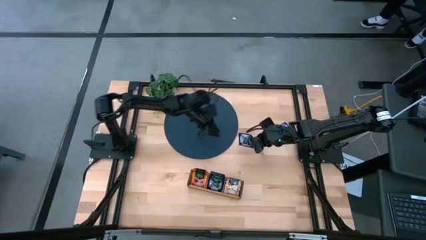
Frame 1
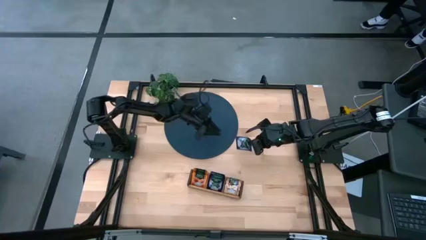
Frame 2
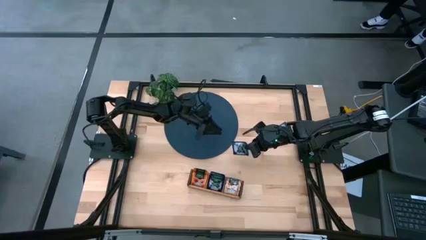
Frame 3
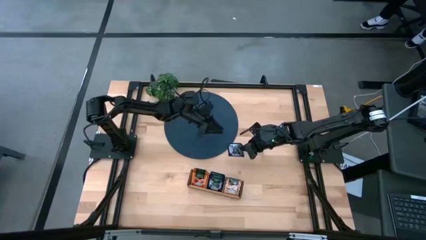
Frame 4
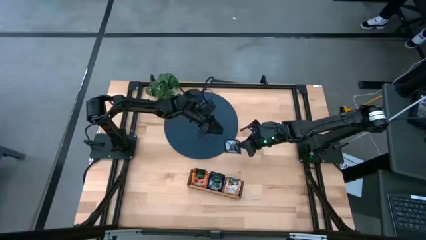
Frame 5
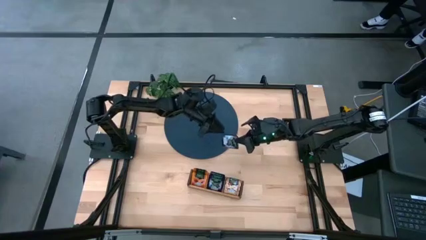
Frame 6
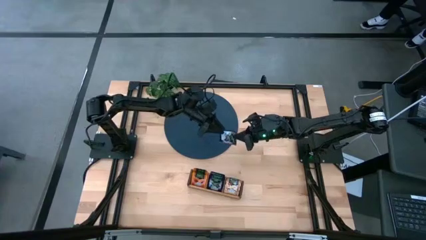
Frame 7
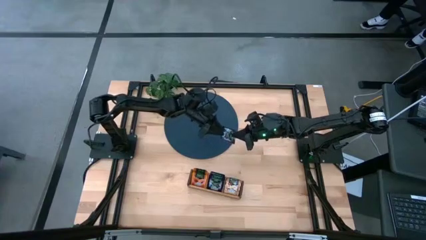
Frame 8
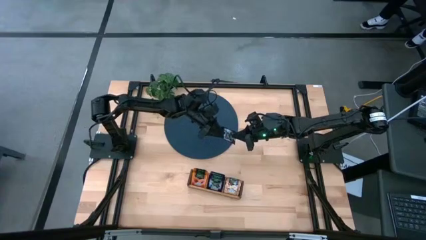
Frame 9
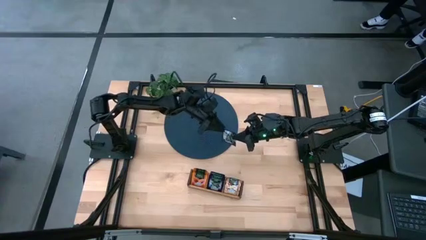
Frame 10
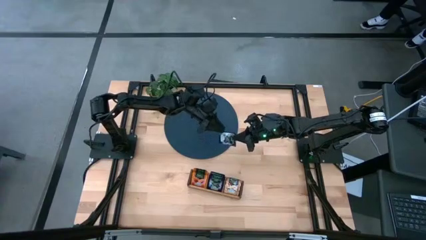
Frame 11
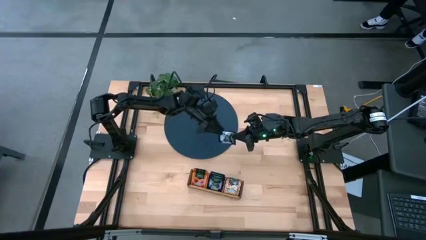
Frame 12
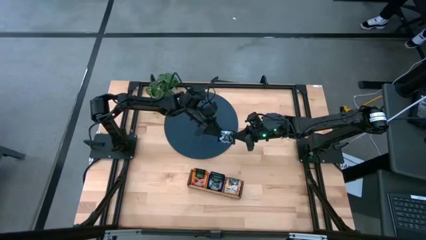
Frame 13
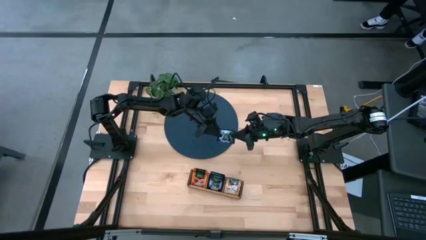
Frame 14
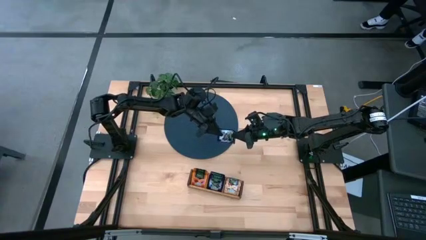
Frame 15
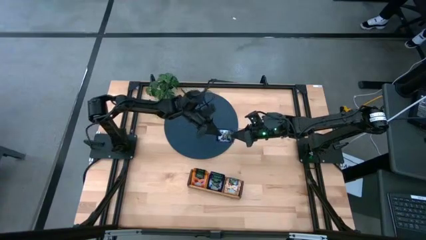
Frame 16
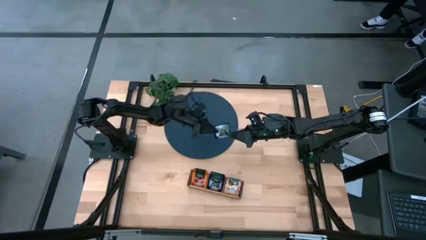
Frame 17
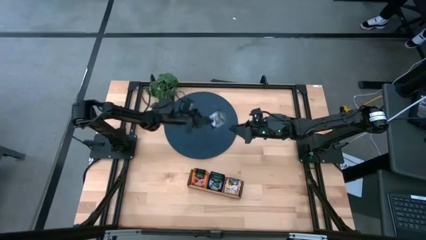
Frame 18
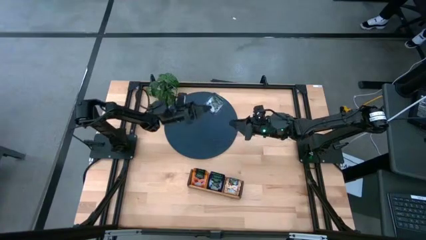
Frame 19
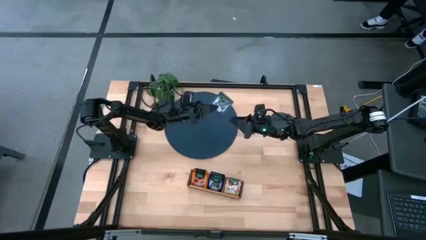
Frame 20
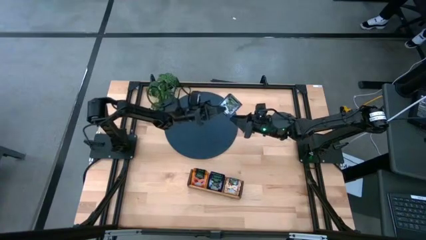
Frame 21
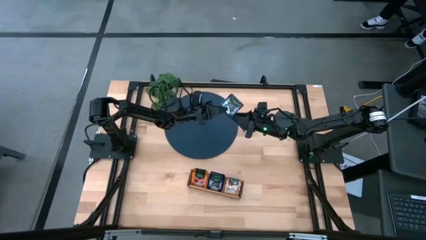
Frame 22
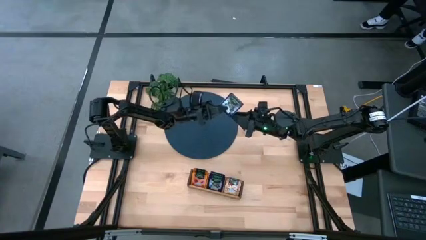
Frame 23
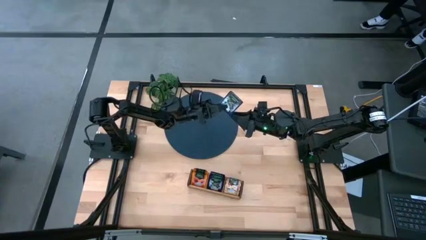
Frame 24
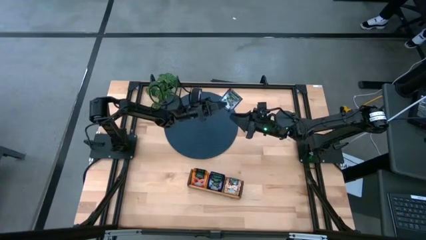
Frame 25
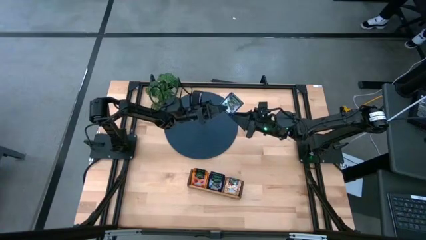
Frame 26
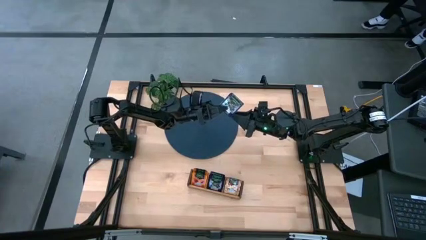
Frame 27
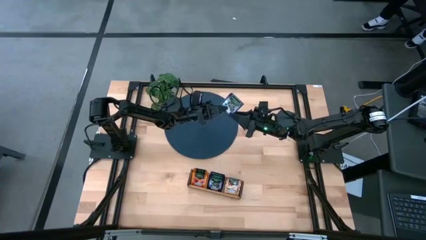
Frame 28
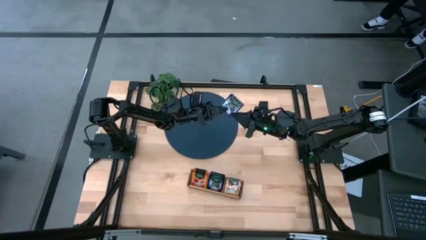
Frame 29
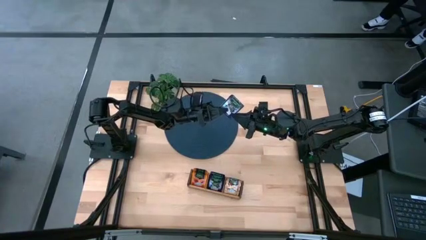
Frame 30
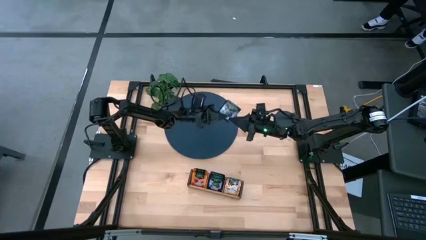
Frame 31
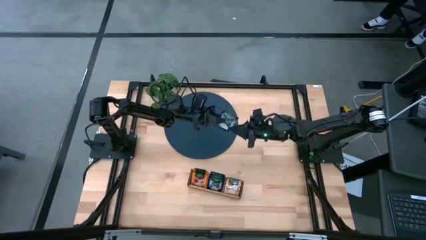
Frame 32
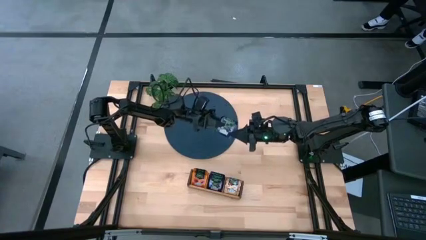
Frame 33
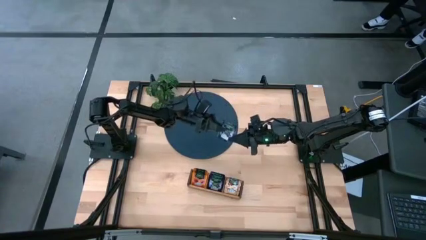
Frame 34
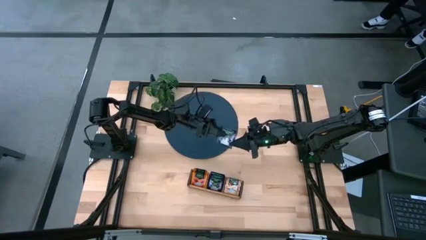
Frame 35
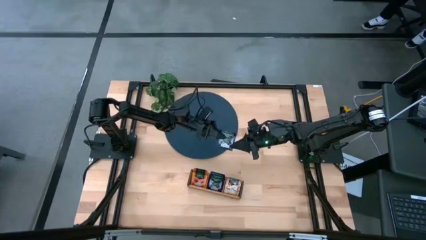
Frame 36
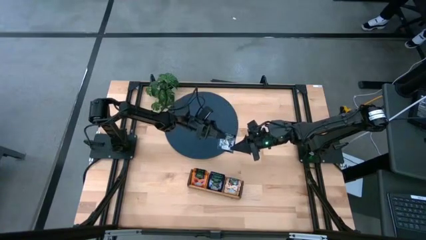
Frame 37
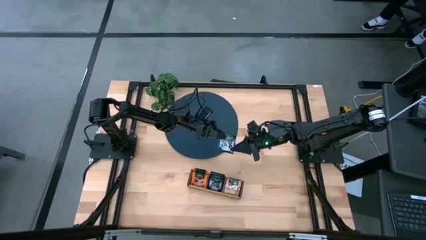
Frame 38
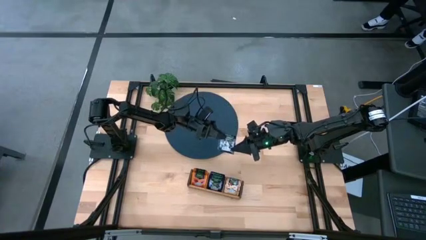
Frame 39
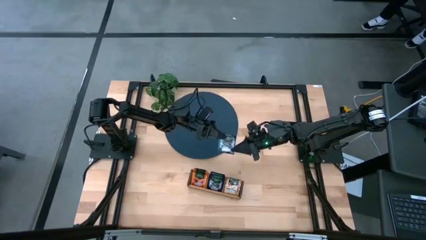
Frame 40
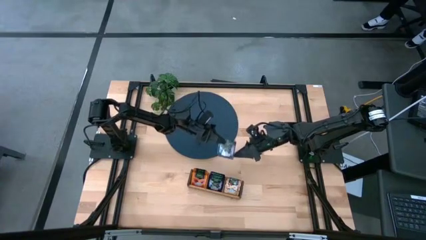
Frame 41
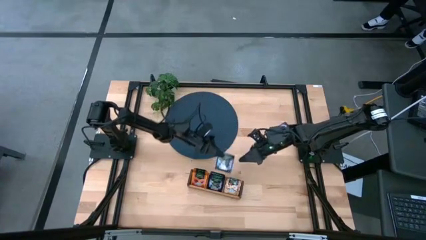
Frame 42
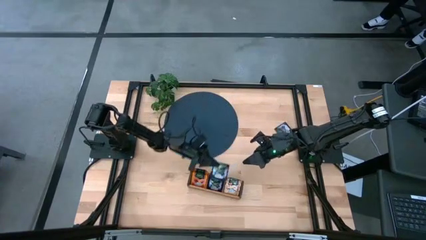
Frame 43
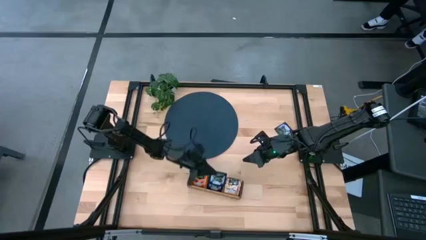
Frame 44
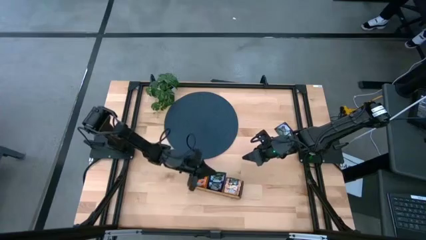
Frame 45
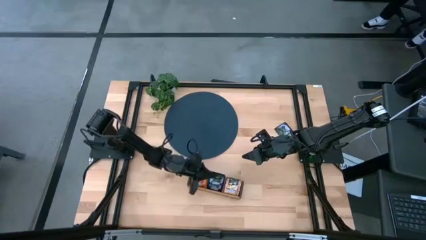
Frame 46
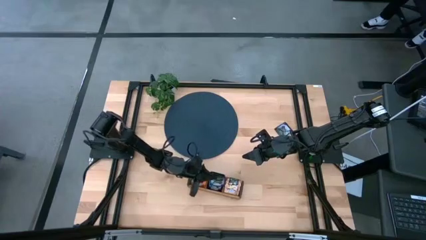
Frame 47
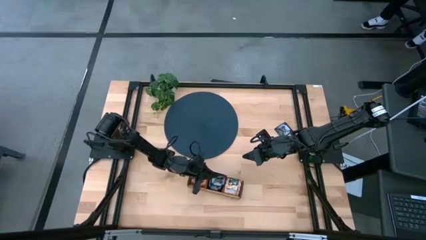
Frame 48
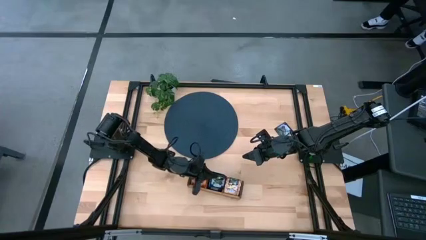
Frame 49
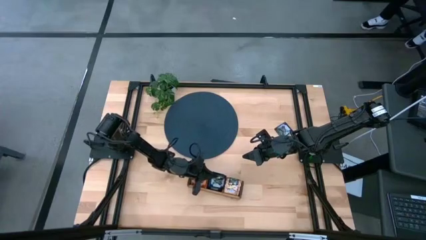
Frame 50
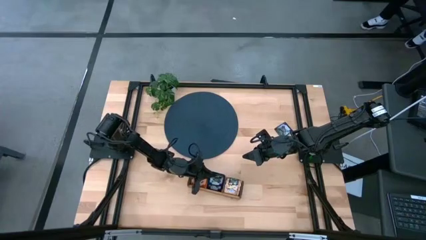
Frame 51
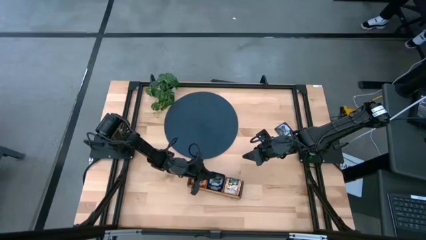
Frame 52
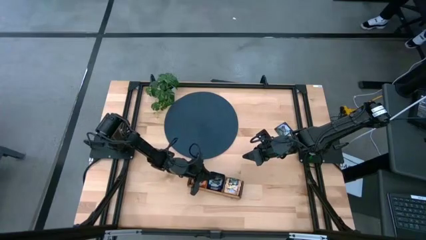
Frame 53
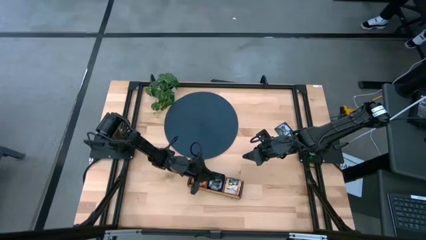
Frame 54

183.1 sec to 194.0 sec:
Task: Pick & Place Tea
Put the violet tea bag into the middle section of the wooden organizer

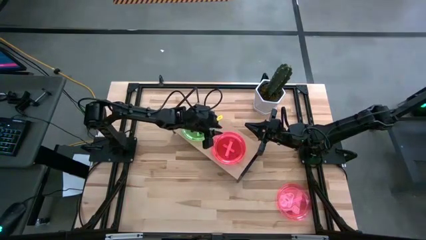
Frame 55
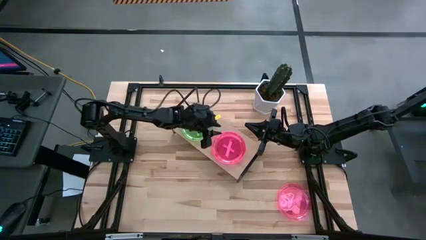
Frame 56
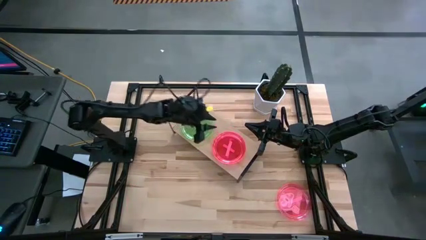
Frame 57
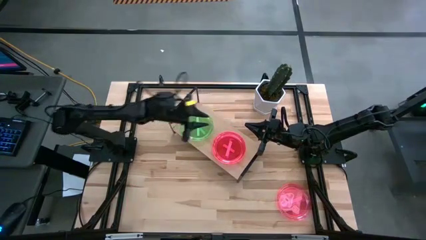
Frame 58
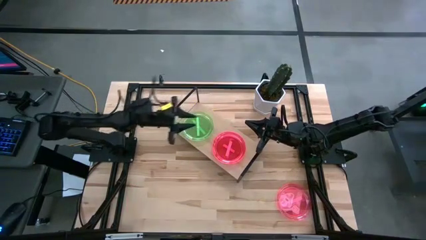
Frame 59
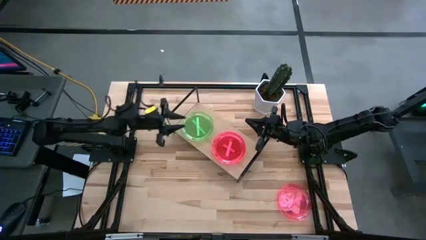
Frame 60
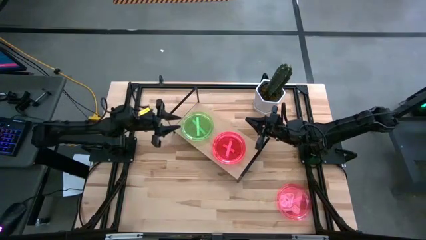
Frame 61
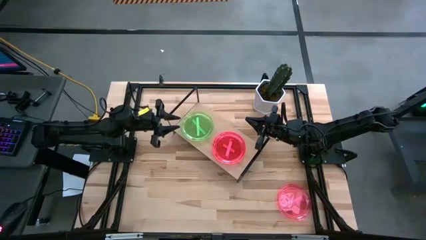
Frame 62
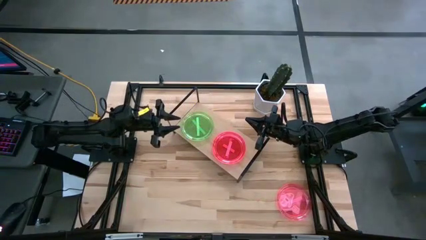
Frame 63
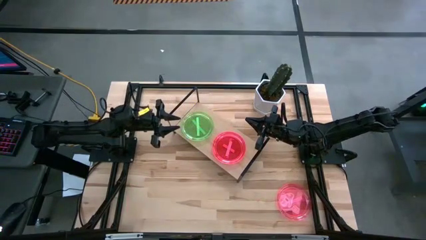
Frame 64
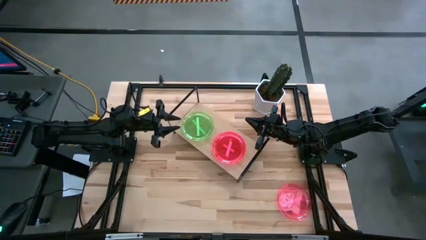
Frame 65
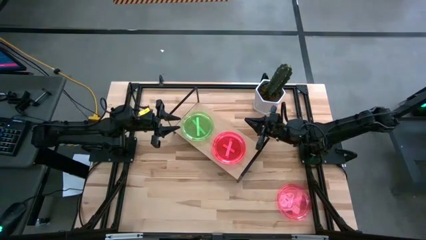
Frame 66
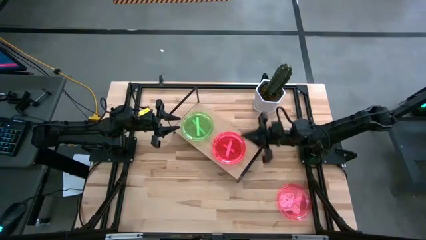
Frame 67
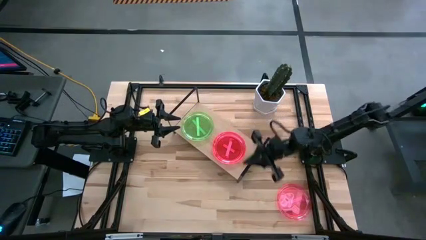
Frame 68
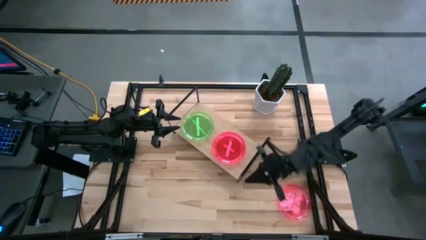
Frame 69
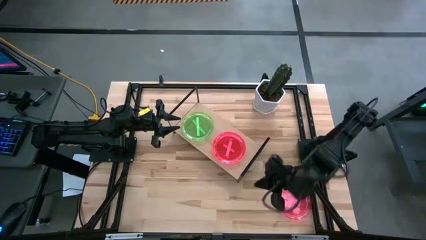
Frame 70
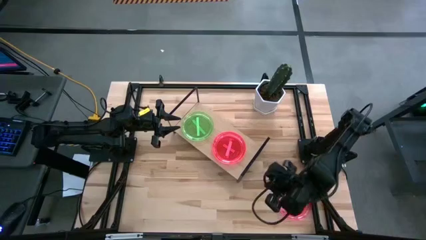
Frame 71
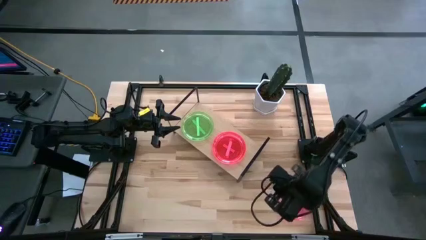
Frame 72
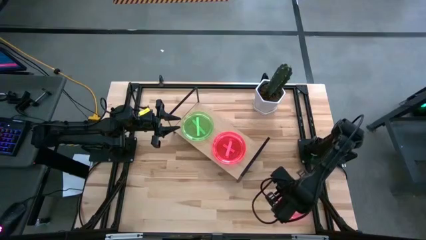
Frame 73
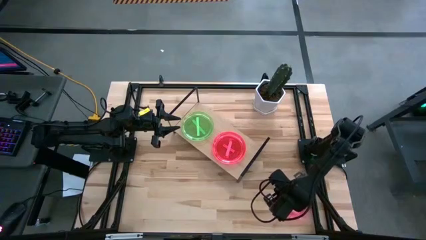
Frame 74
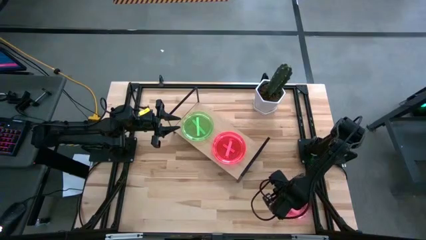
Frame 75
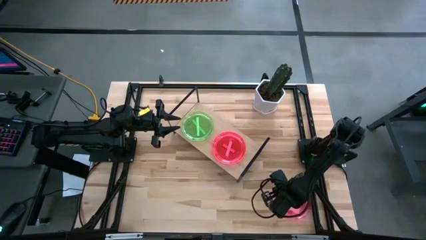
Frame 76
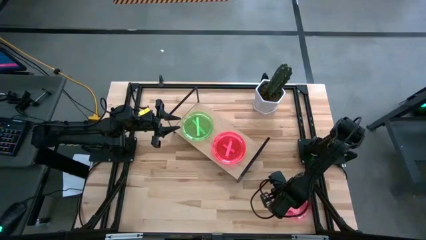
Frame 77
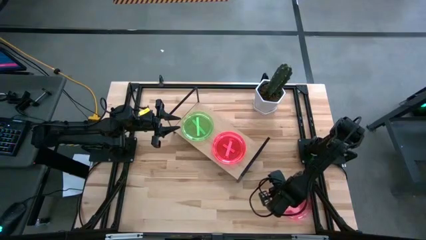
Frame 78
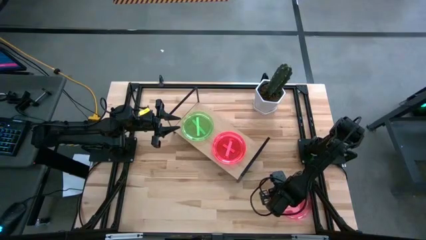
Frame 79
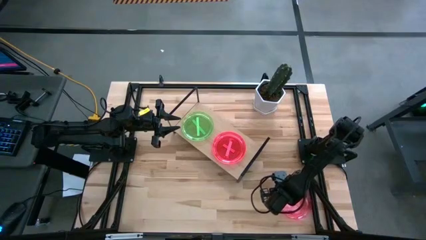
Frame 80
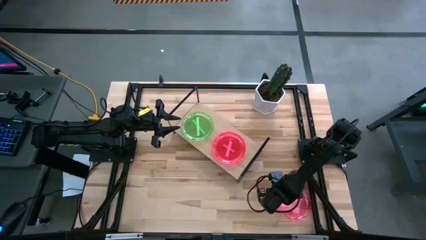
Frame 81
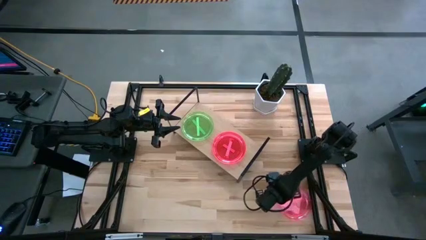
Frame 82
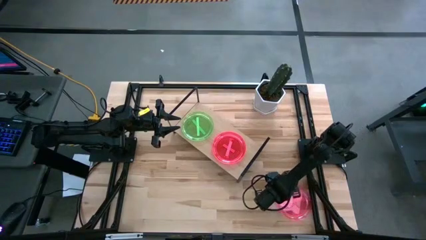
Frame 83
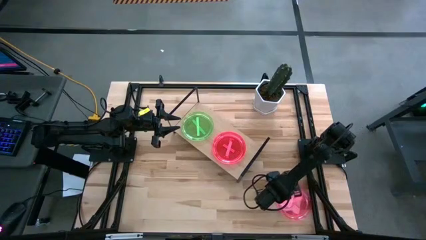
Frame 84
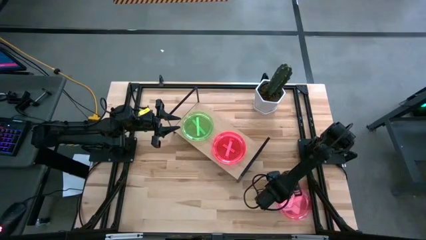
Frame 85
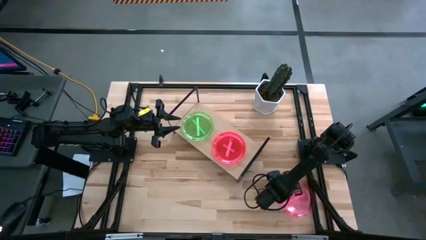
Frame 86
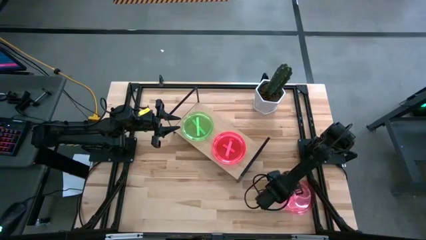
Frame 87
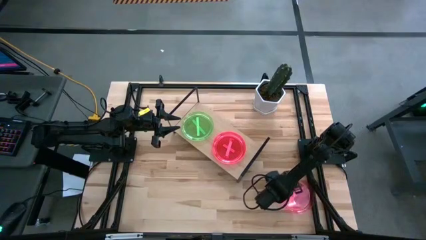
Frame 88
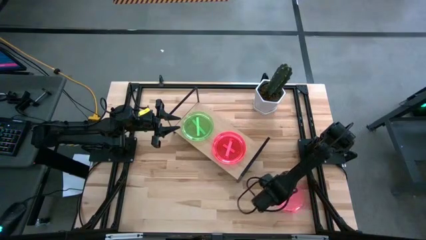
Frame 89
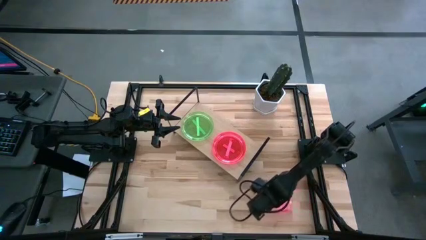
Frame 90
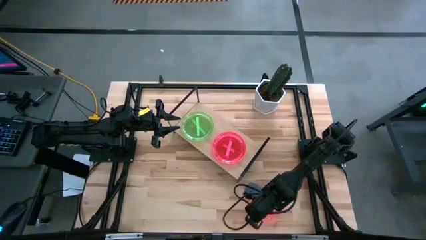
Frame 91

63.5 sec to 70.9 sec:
Task: Place and stack plates onto a shelf
Stack the pink plate on top of the other pink plate on the shelf
